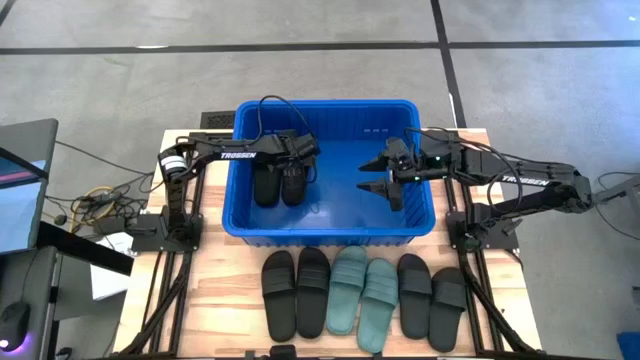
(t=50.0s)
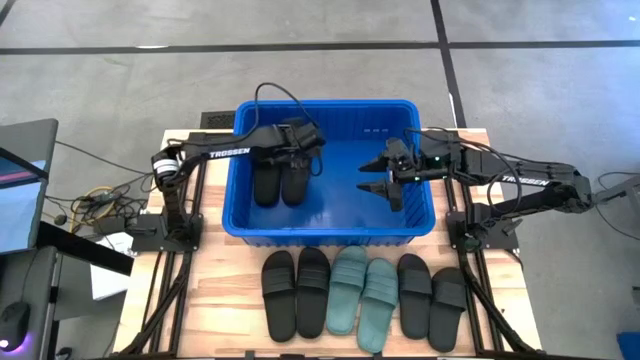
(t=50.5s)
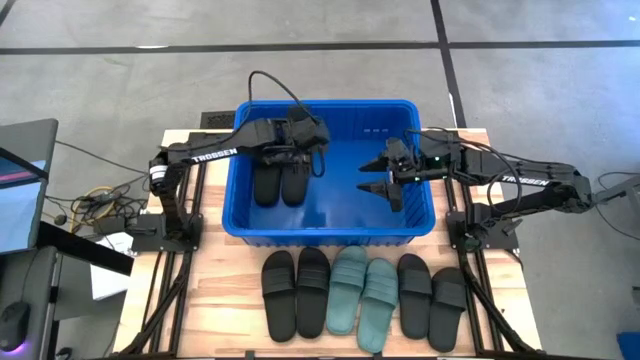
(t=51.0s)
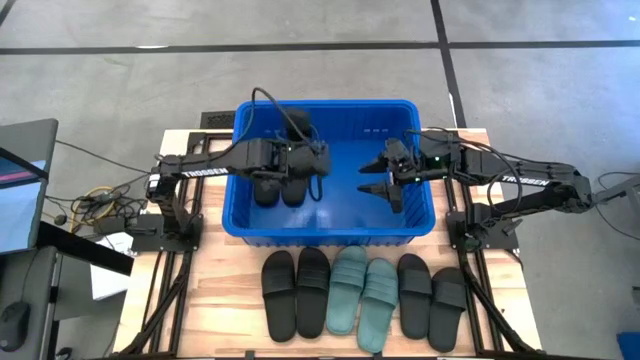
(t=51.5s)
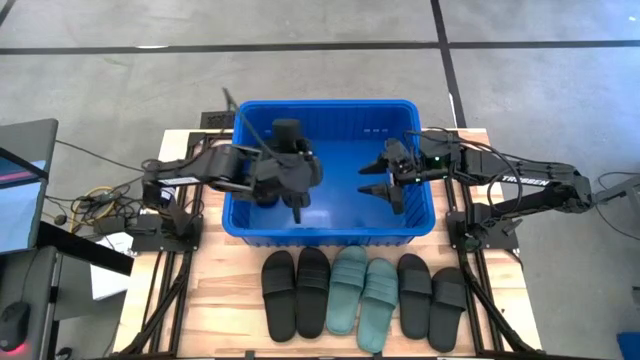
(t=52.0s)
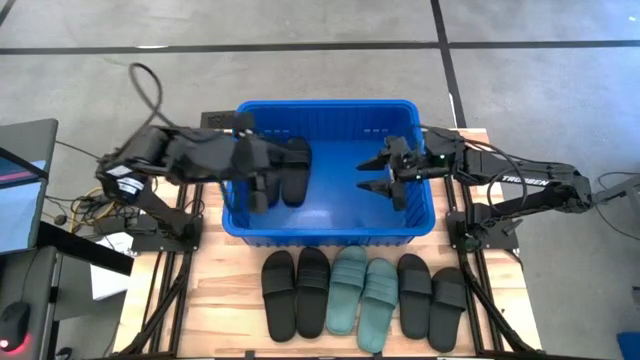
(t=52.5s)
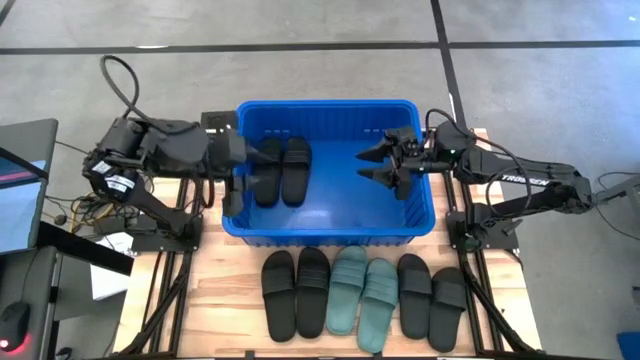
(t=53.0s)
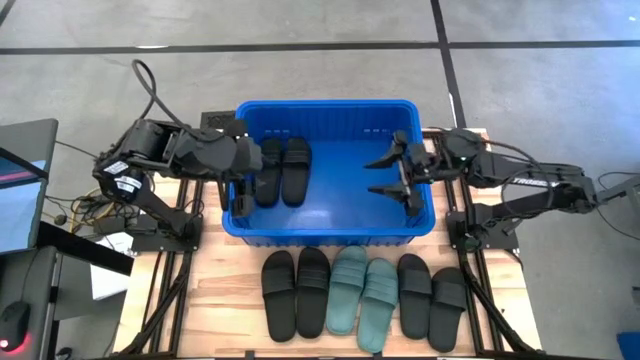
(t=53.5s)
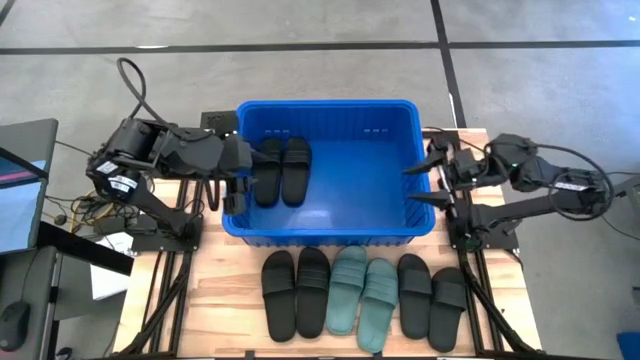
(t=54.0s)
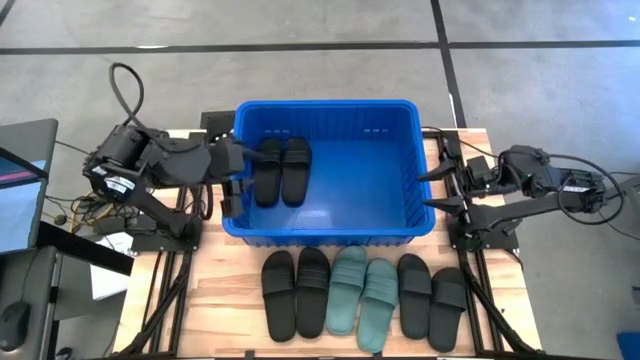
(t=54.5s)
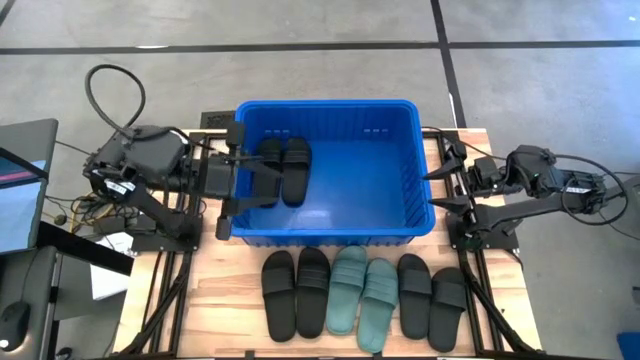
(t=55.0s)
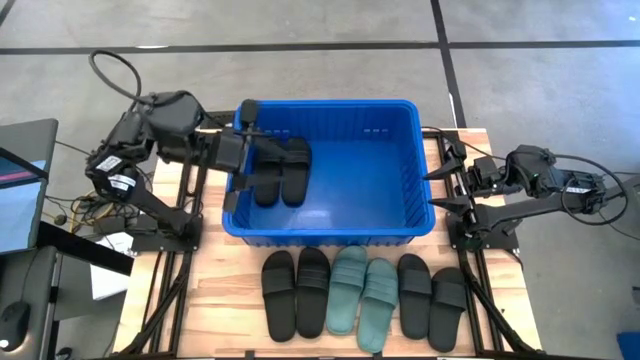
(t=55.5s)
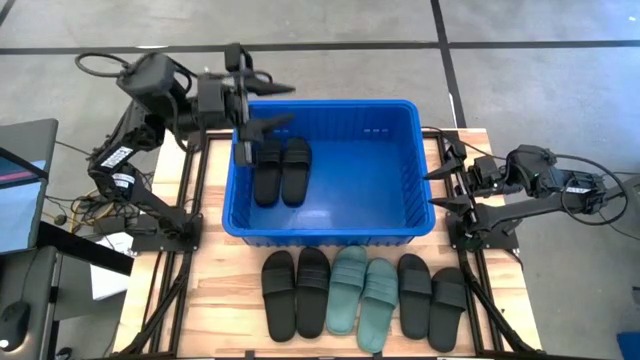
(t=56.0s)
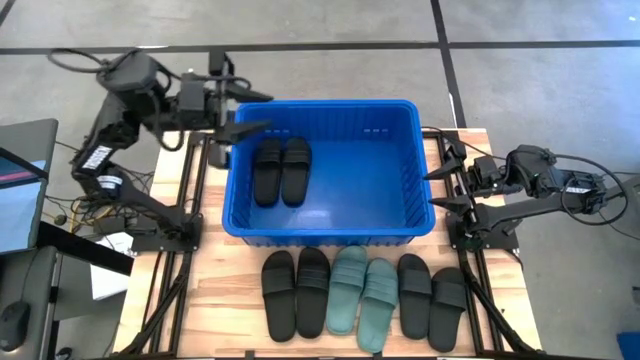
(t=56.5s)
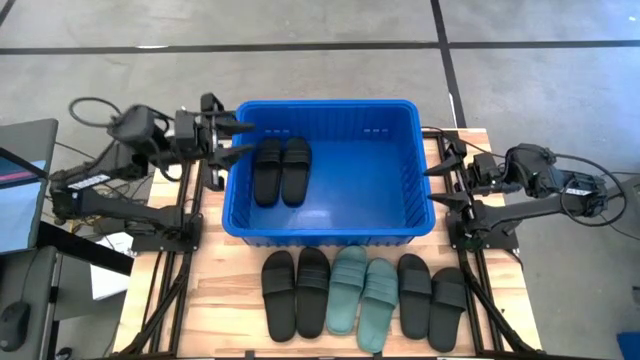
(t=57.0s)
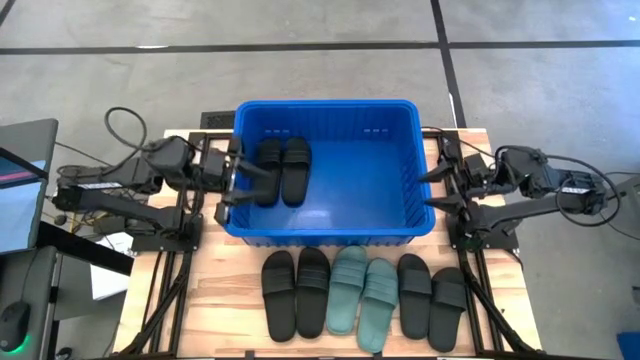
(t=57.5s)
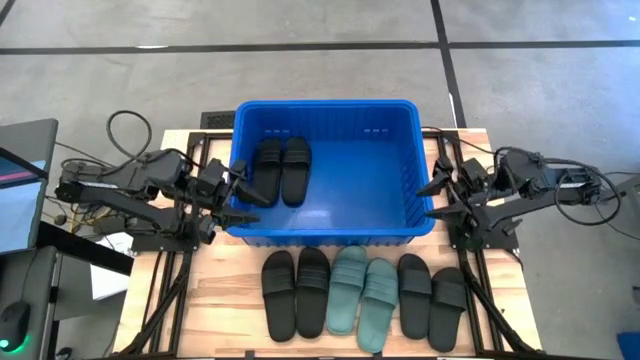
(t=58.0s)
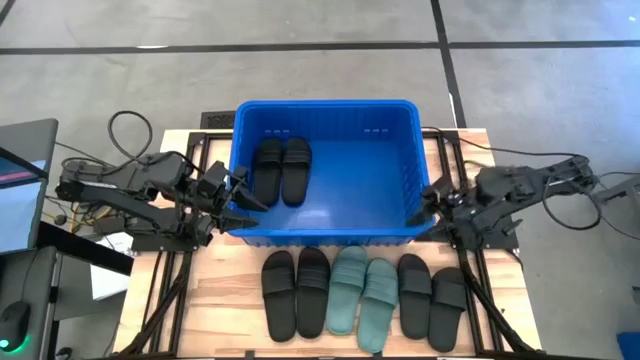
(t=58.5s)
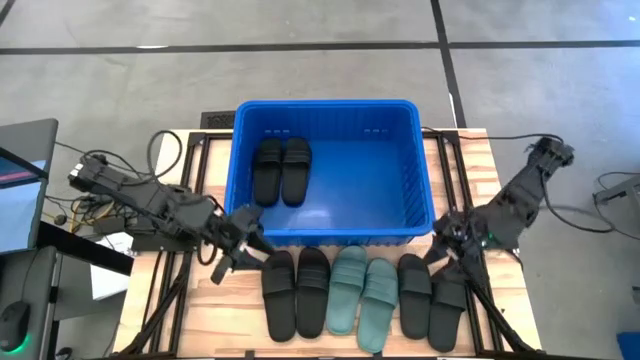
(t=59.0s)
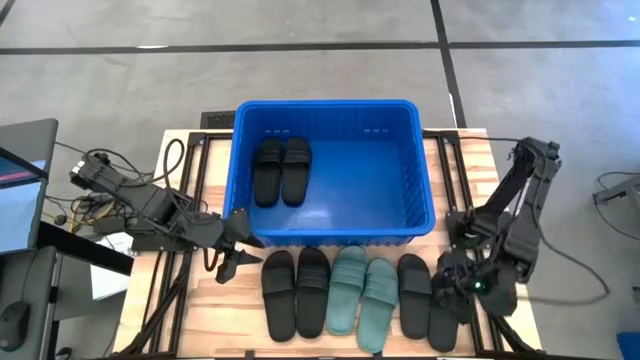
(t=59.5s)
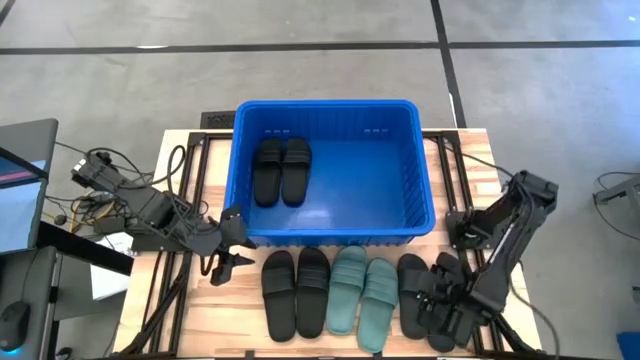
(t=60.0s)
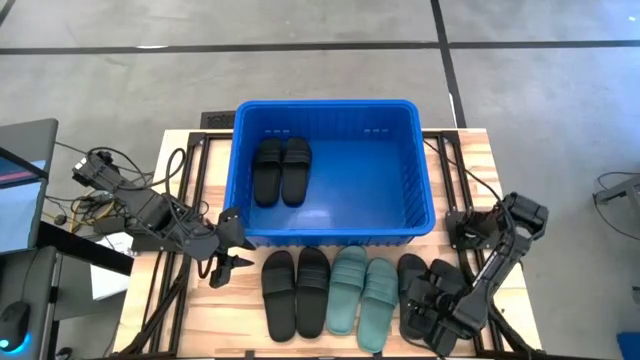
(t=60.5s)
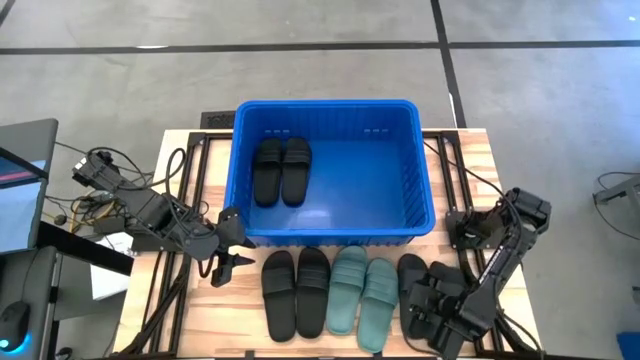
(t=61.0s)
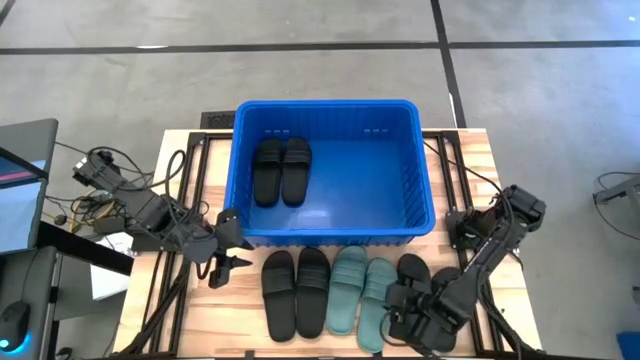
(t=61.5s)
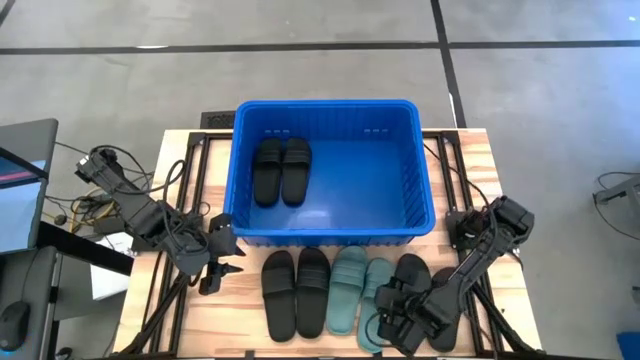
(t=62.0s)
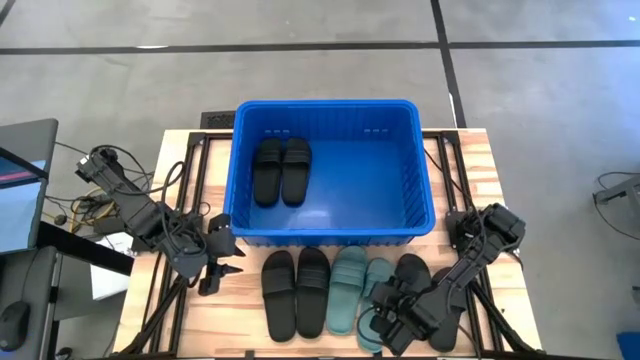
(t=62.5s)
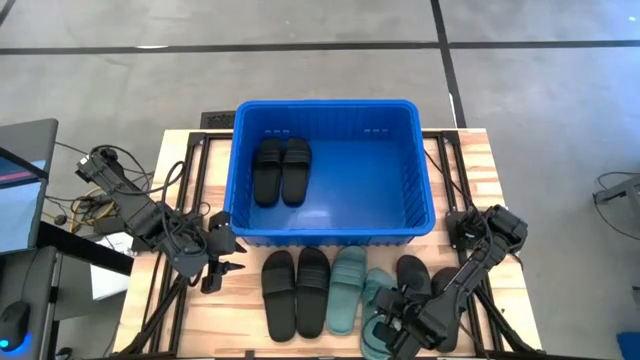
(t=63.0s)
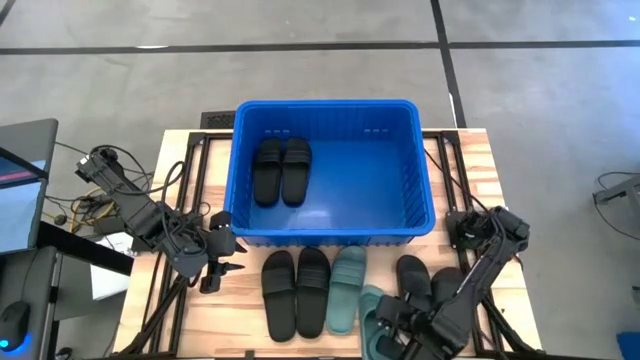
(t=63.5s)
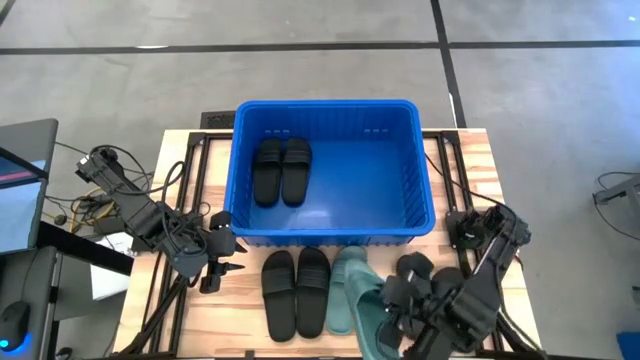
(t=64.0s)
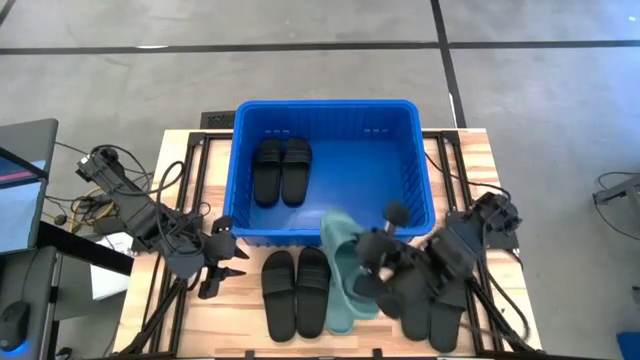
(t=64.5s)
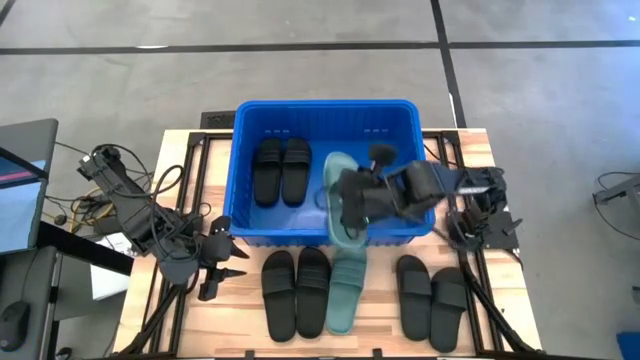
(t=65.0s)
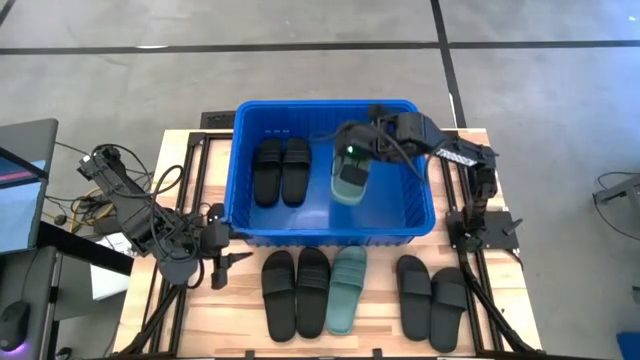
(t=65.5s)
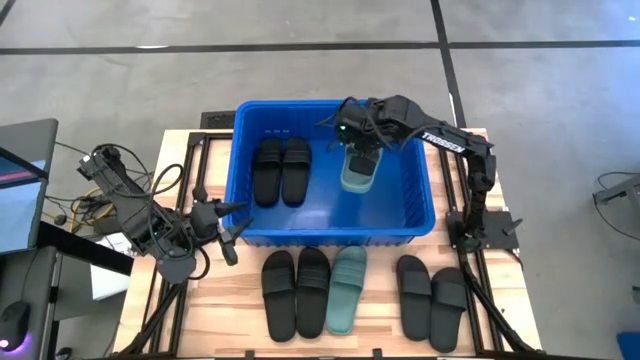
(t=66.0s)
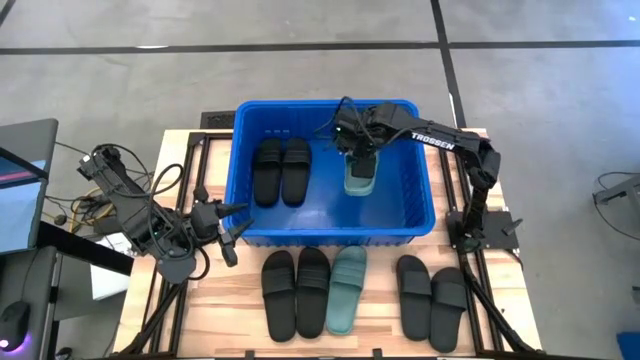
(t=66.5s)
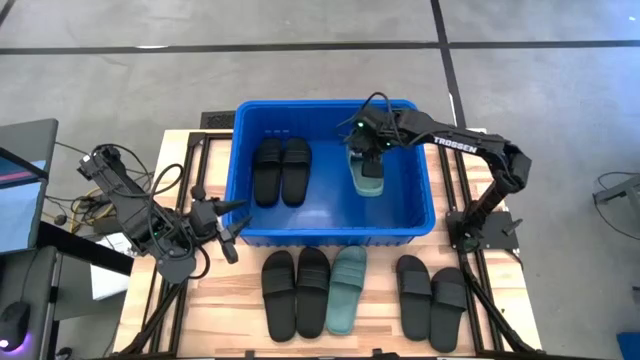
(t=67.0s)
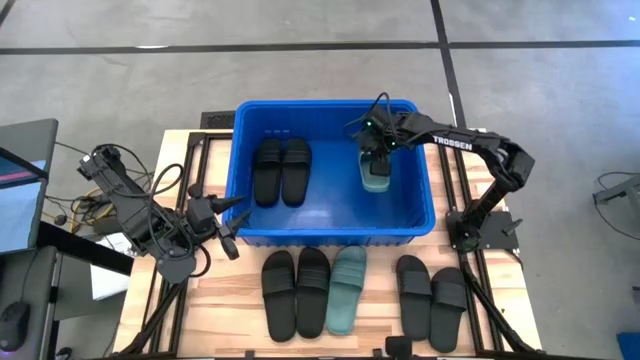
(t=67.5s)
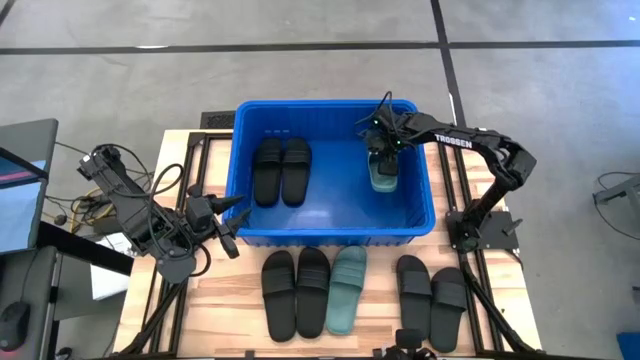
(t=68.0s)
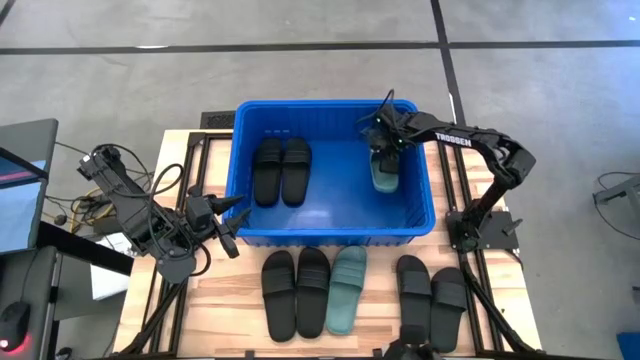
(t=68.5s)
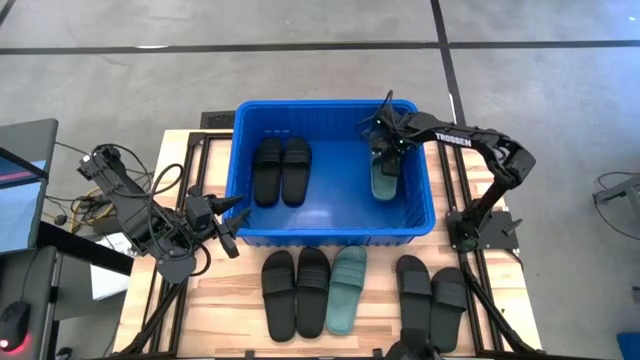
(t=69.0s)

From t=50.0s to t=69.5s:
Task: Pick and place slides into bin
Put the right green slide into the blue bin

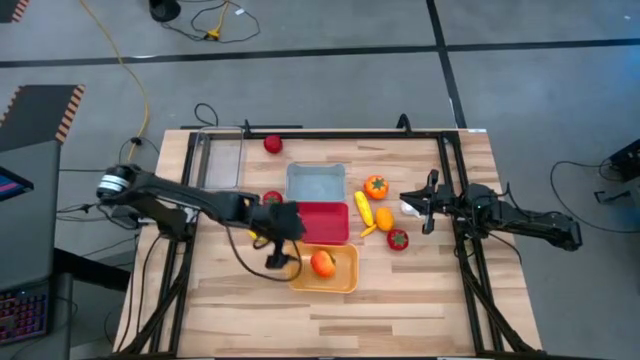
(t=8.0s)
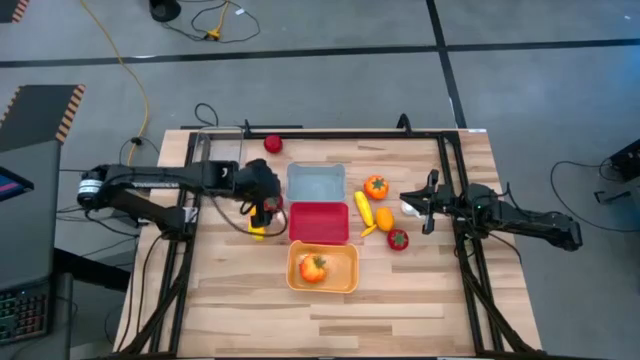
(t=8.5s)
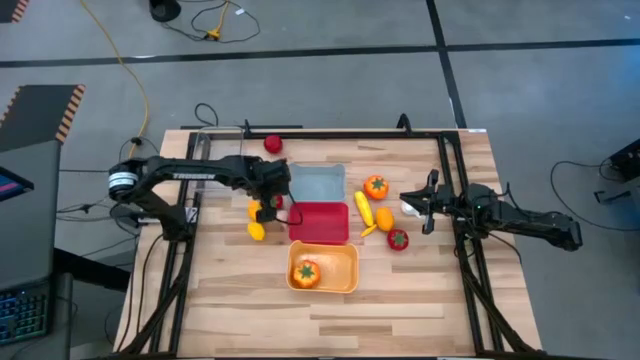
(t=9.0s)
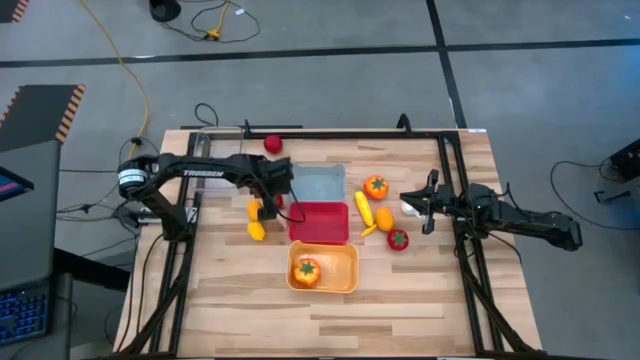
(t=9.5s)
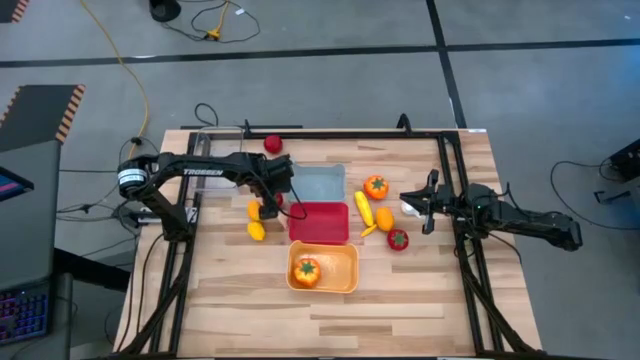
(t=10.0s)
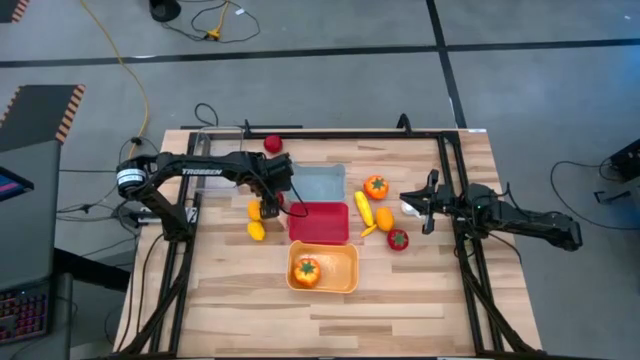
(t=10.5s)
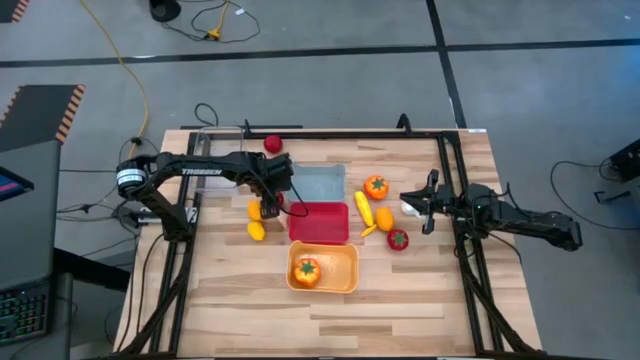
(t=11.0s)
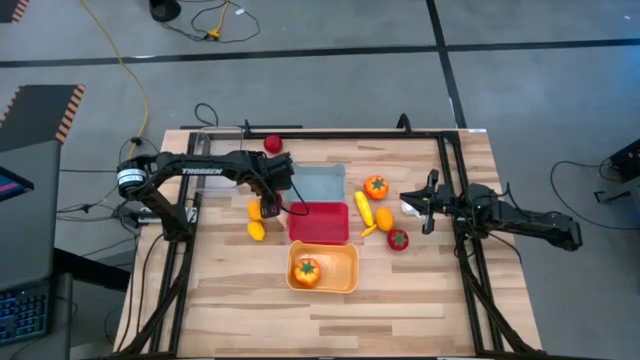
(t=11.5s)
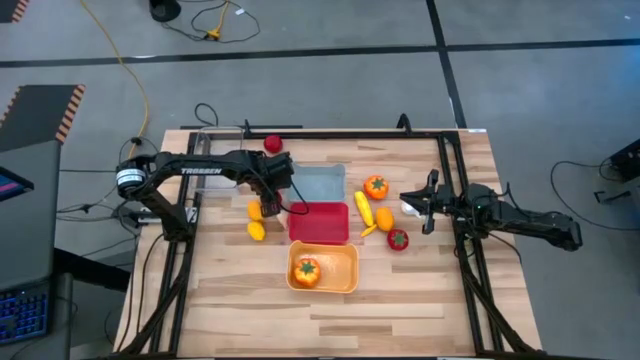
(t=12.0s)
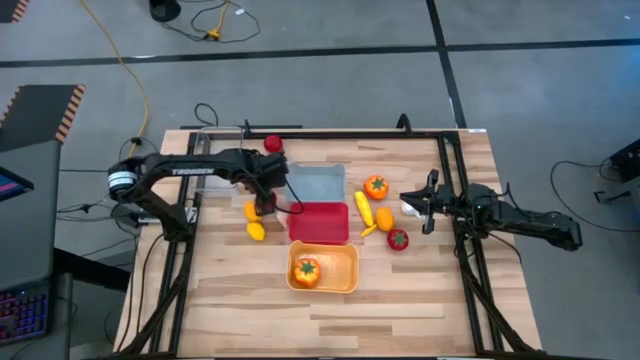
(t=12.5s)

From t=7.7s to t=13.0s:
Task: Sort produce into baskets
Put the bottom left red tomato into the yellow bin
